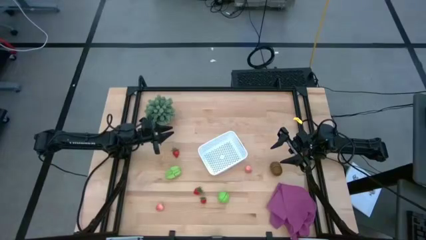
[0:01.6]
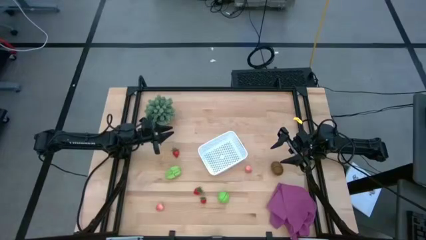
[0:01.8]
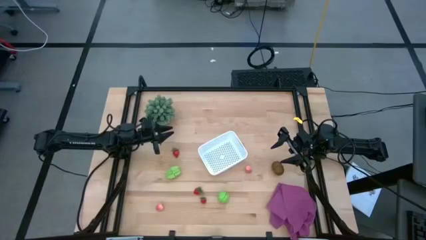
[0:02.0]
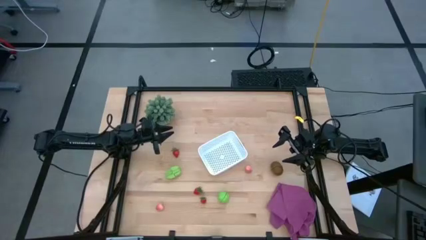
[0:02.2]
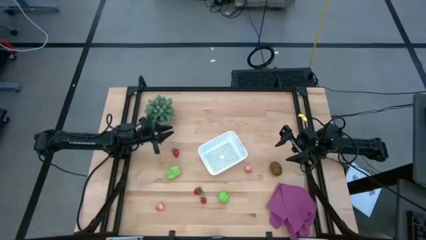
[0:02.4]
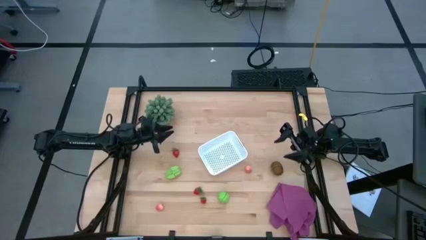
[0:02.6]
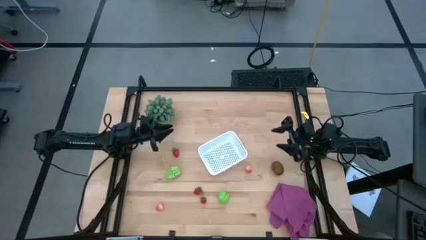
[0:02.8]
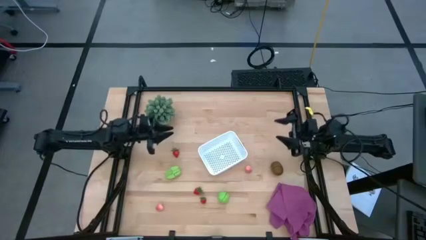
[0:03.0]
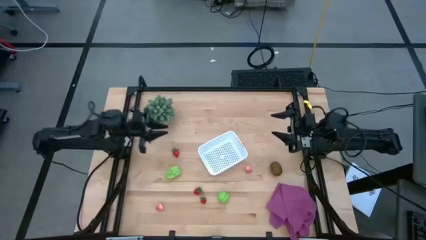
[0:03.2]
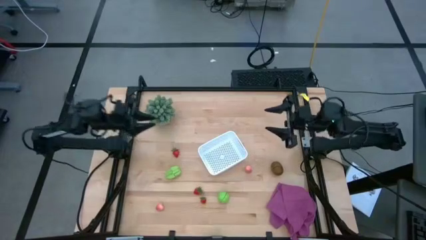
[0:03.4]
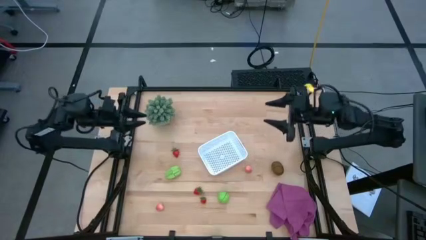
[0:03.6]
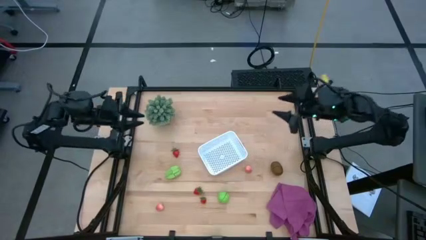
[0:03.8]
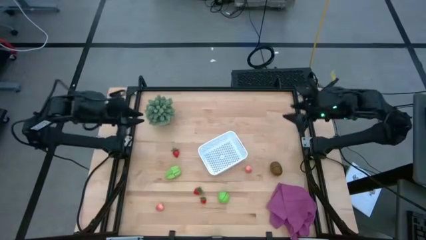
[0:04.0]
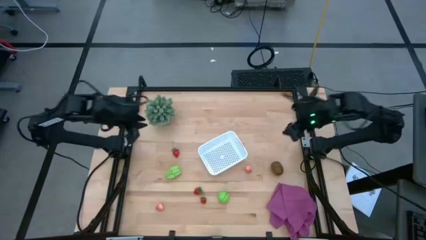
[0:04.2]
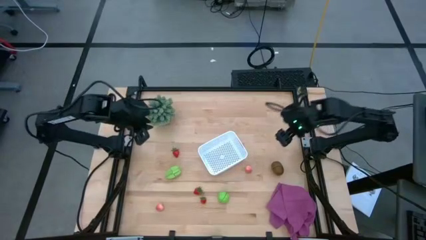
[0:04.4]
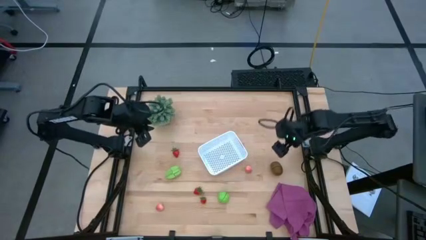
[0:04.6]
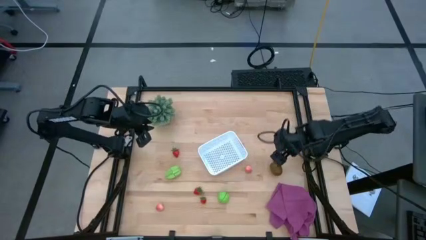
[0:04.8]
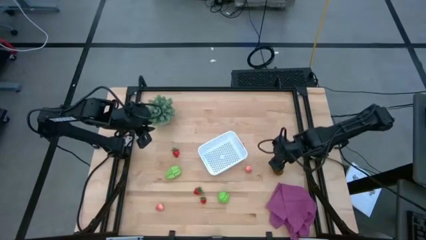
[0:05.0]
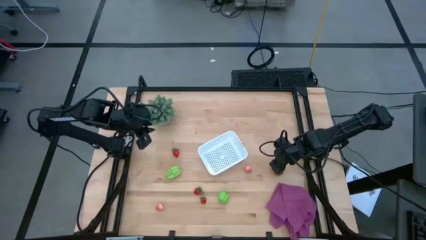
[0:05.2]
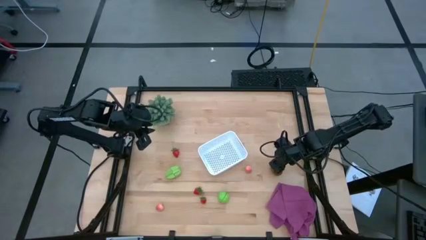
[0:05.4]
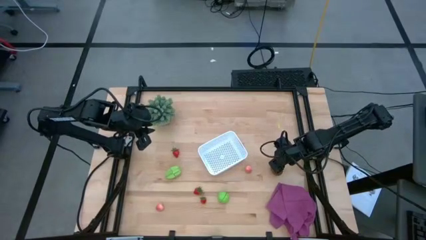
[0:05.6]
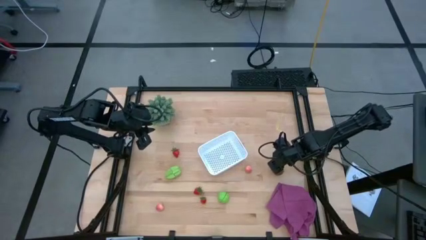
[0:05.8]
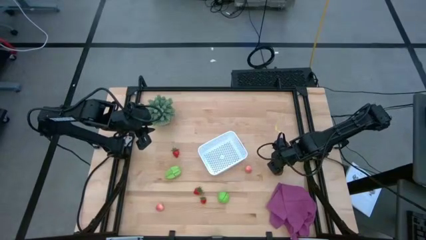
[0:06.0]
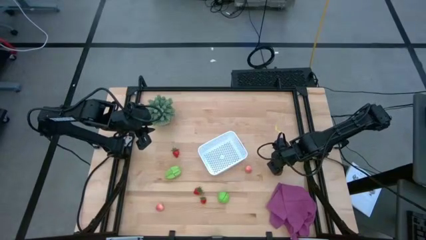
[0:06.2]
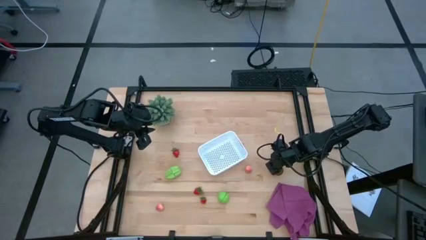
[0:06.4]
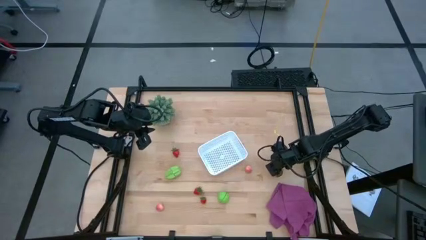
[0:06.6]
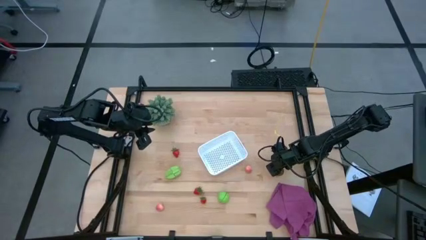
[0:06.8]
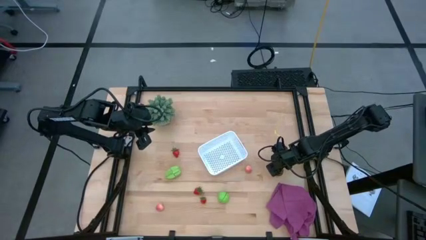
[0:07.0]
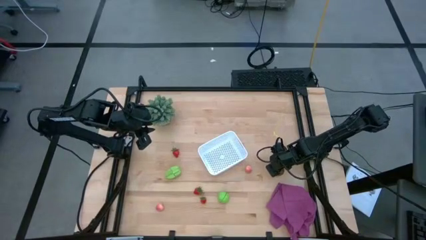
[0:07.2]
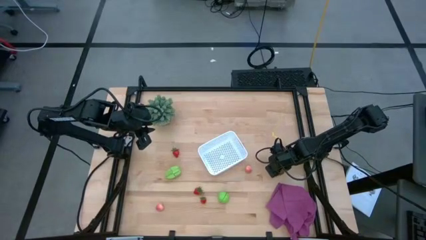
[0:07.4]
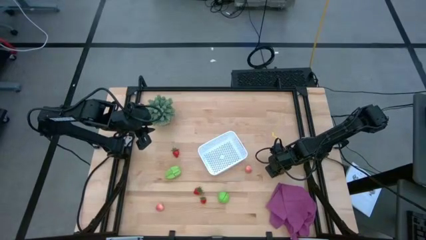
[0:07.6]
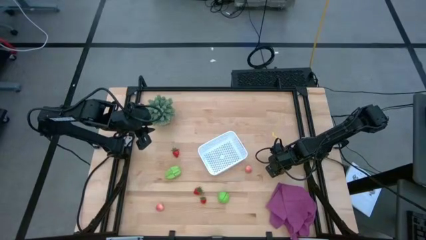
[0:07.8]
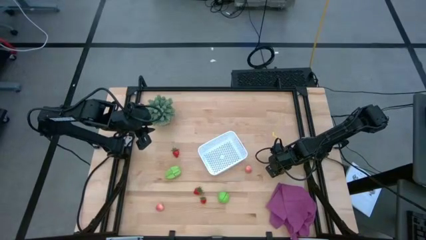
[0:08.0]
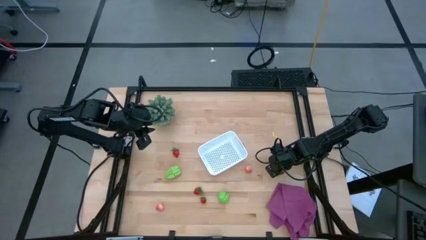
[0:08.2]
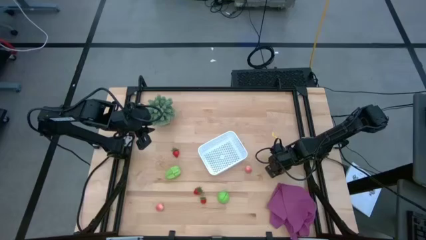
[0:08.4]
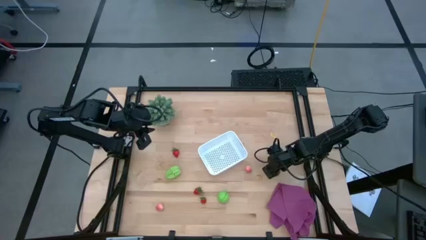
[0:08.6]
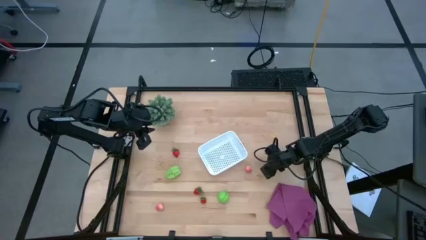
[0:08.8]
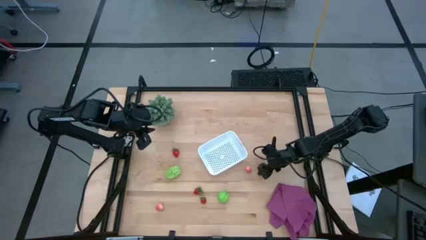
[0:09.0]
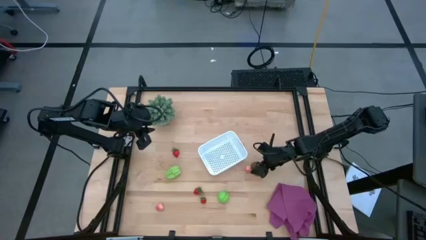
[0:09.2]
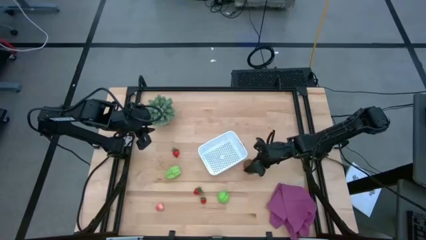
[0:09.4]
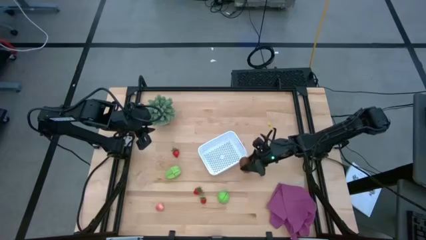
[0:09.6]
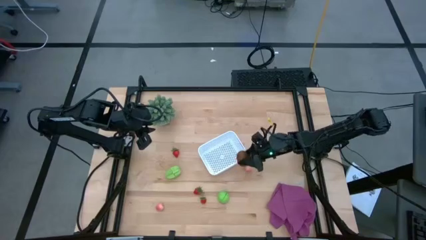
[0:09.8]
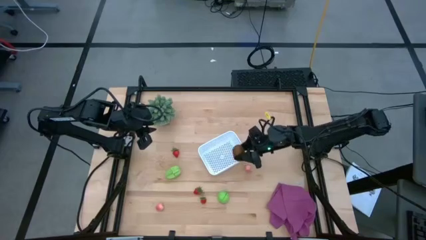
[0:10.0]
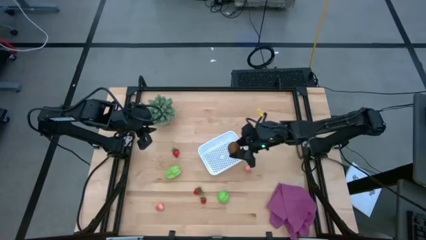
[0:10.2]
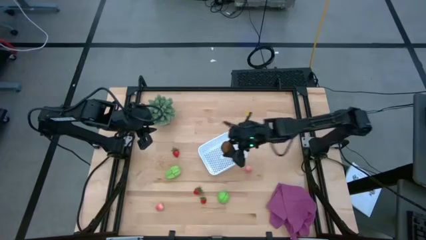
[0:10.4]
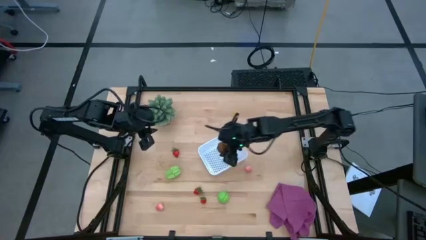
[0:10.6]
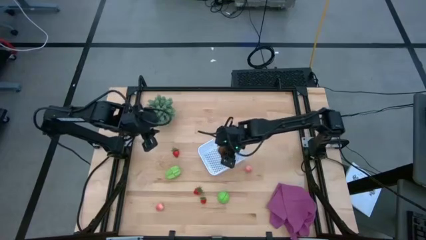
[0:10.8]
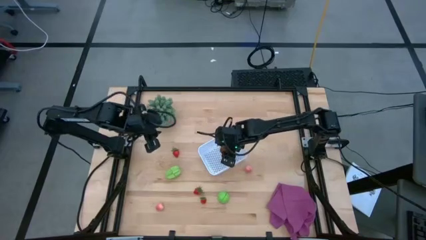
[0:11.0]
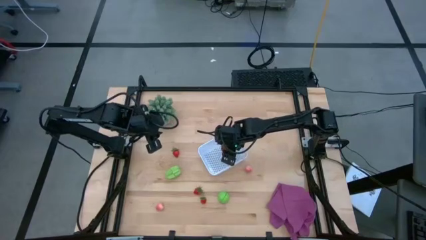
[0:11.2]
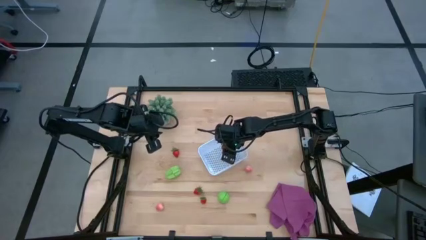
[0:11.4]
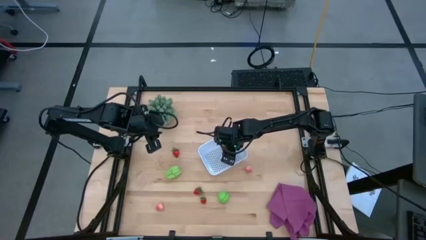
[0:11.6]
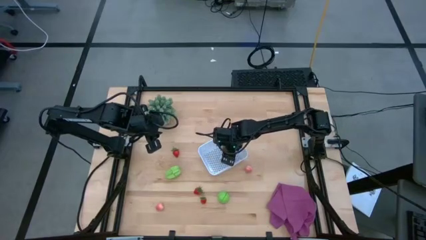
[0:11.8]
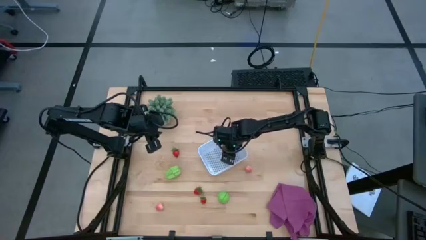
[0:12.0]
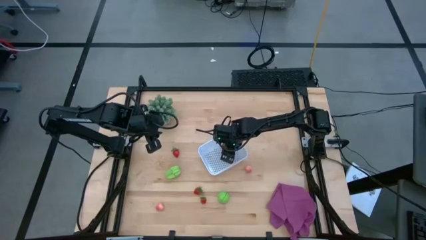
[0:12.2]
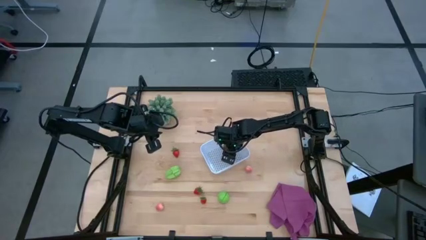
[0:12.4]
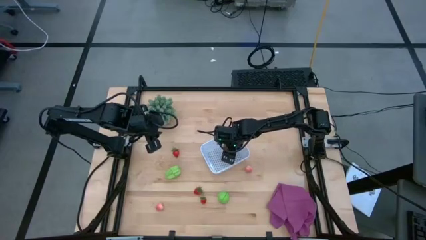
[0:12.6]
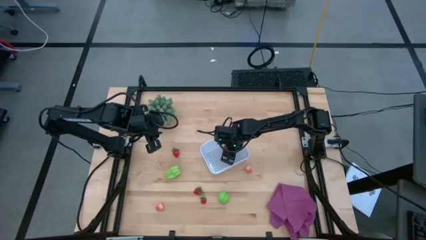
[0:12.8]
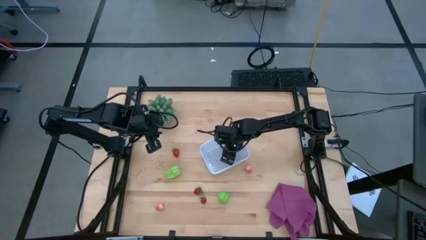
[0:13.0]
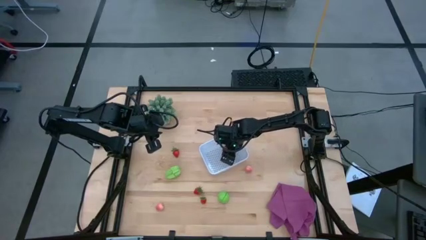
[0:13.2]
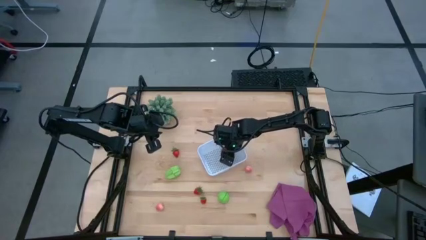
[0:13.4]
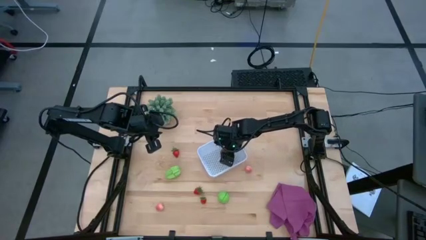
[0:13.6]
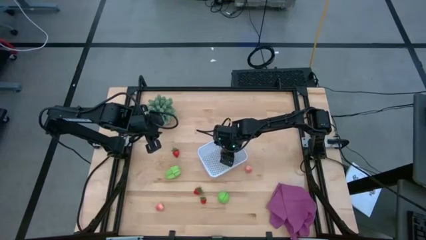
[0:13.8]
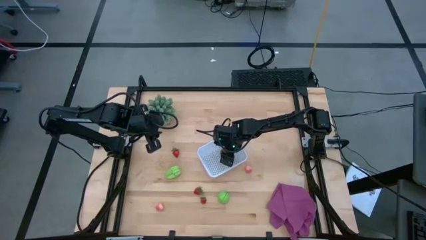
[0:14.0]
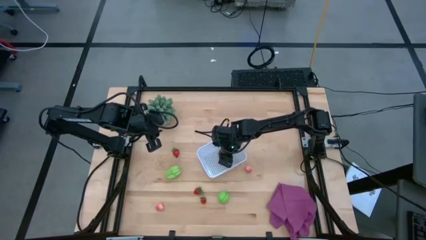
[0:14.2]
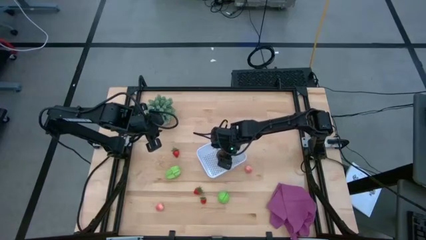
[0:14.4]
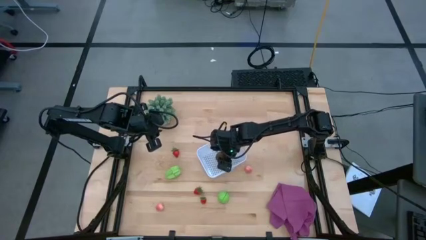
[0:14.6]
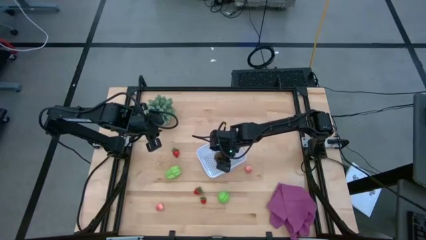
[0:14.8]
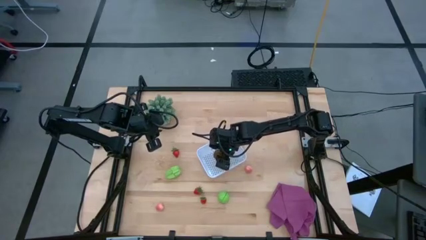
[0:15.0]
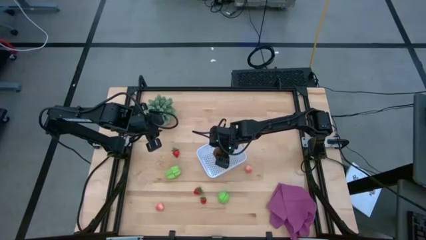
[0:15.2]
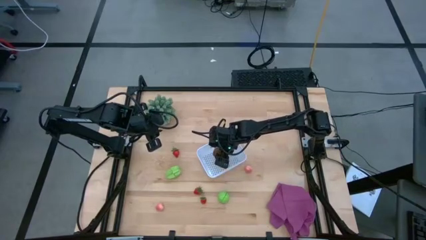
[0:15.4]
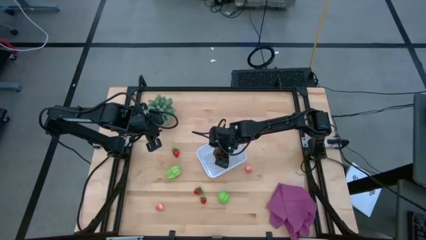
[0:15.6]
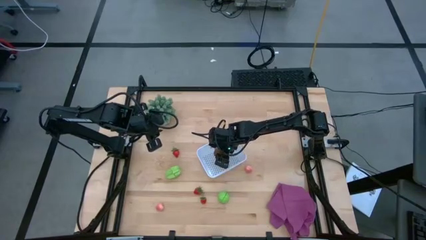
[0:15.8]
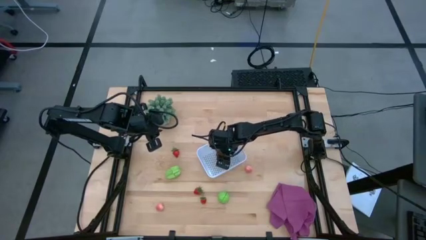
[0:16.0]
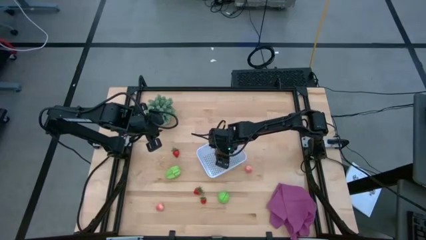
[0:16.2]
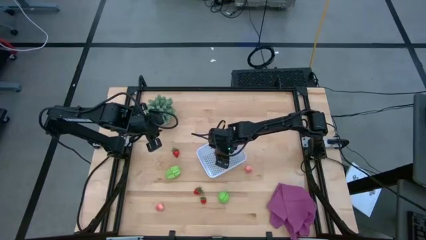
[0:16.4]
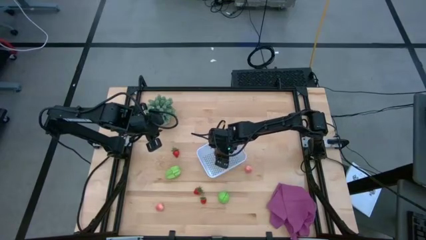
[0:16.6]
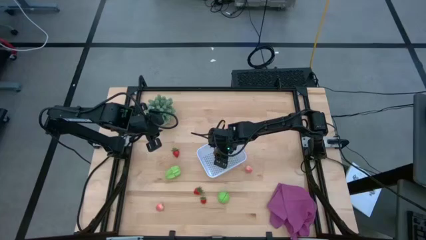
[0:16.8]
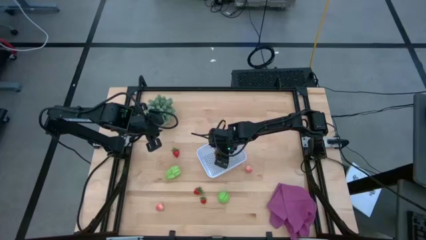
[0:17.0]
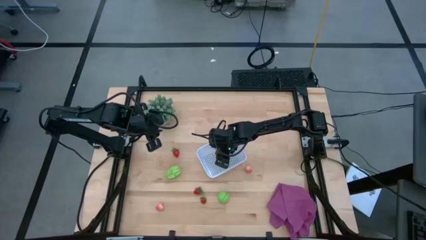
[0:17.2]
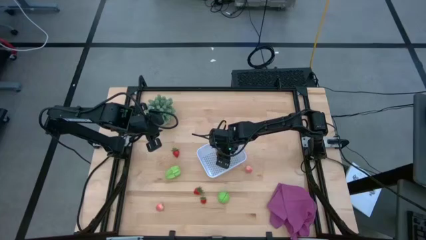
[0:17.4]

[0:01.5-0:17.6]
Task: Pick and placing Produce into tupperware
Put the kiwi into the white bin
